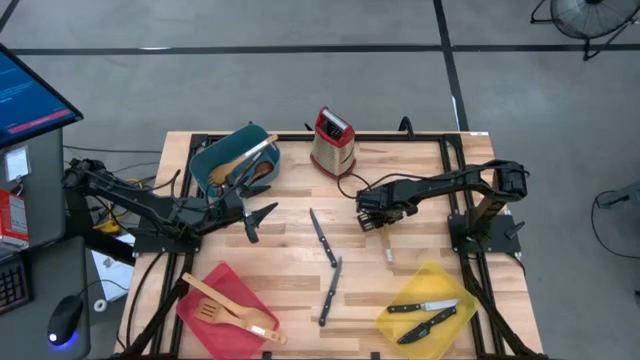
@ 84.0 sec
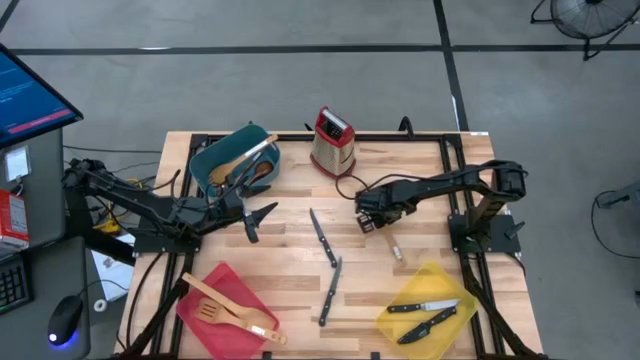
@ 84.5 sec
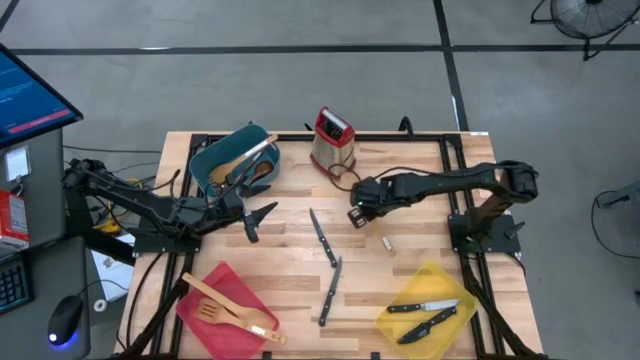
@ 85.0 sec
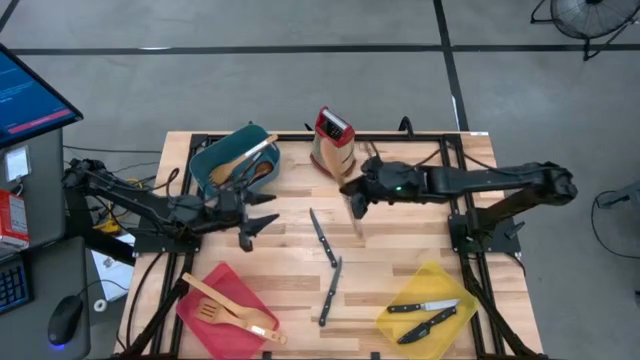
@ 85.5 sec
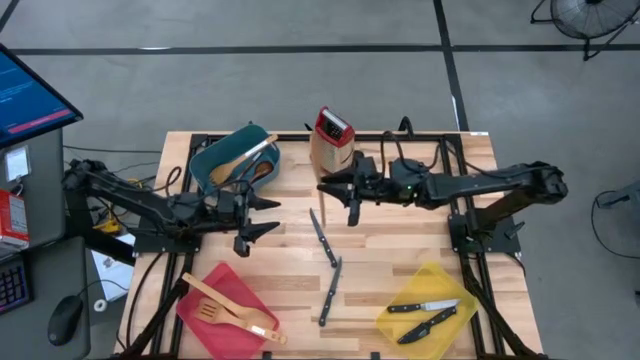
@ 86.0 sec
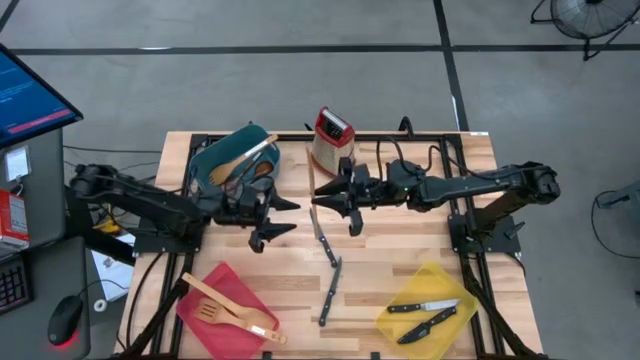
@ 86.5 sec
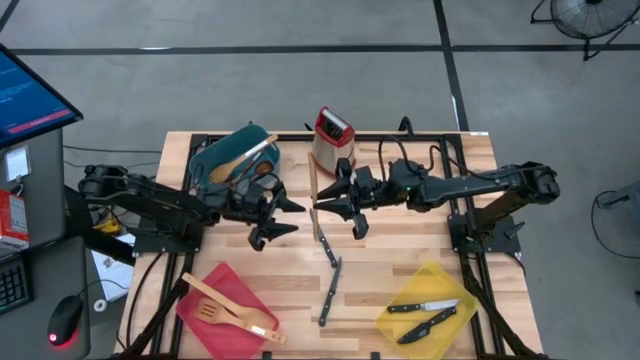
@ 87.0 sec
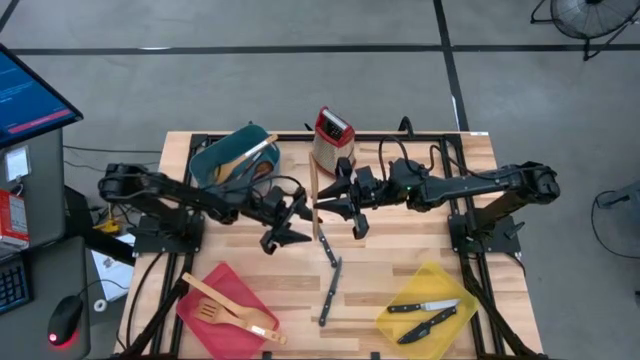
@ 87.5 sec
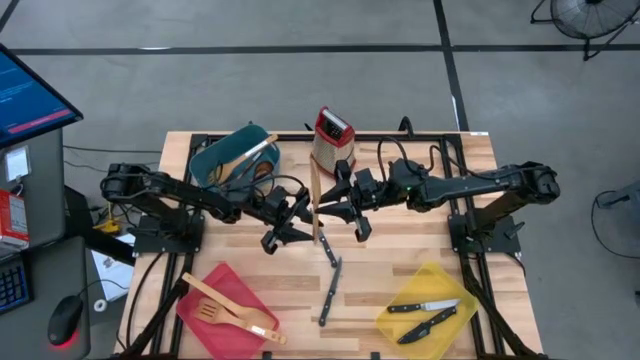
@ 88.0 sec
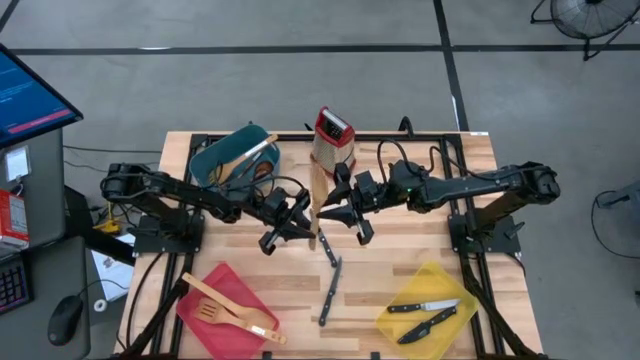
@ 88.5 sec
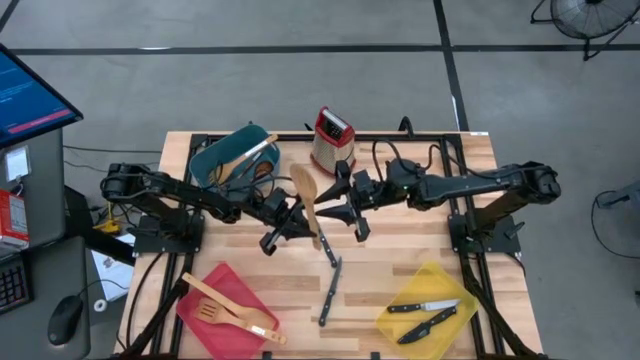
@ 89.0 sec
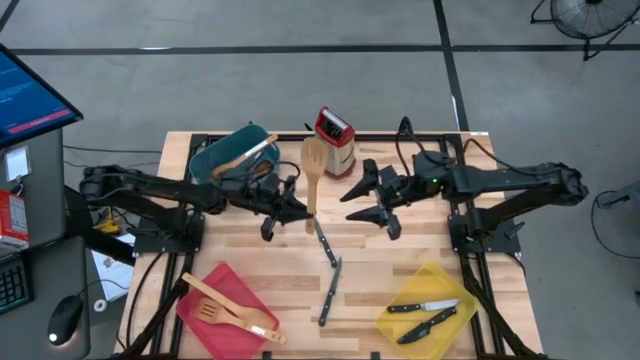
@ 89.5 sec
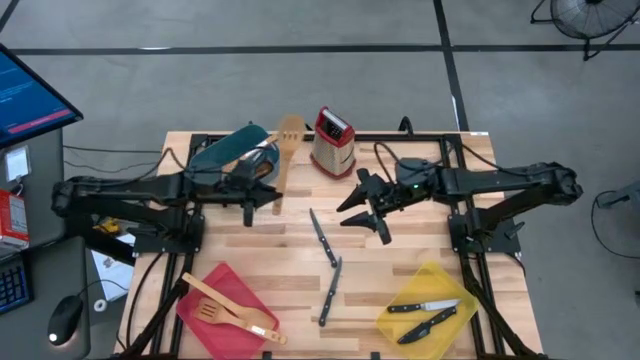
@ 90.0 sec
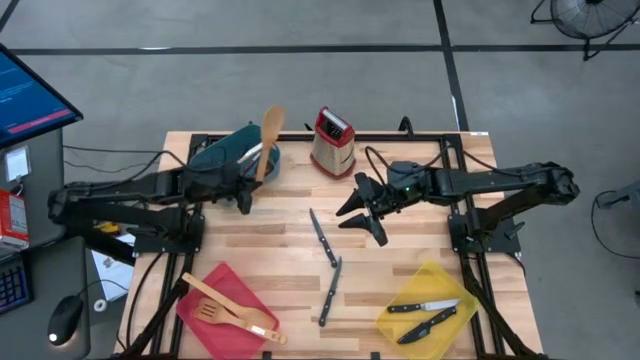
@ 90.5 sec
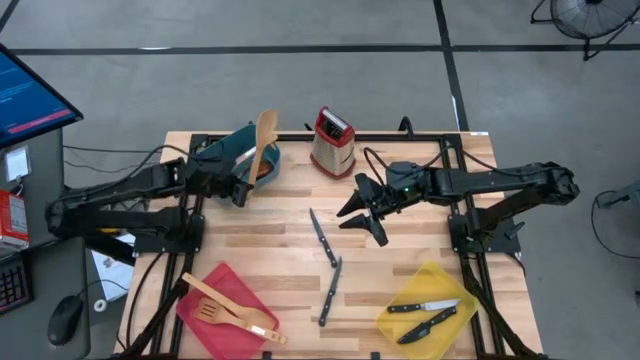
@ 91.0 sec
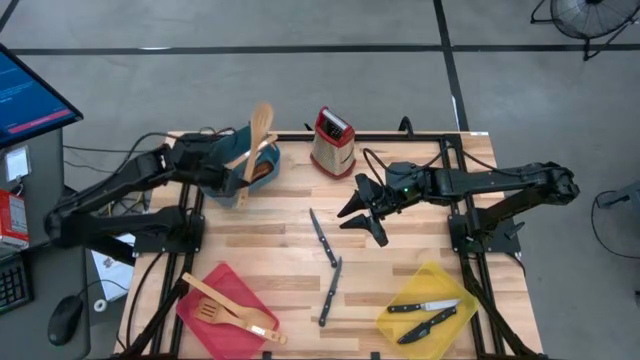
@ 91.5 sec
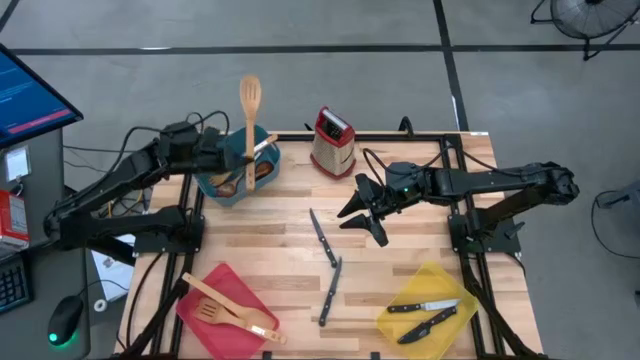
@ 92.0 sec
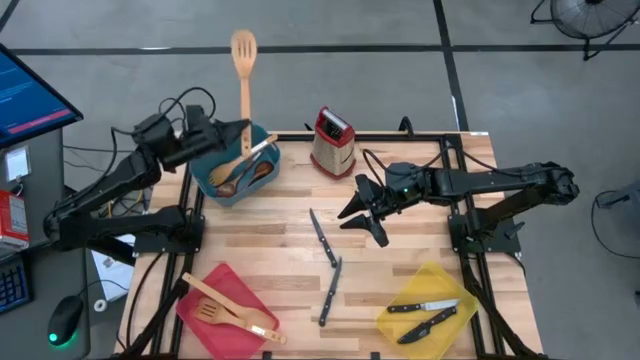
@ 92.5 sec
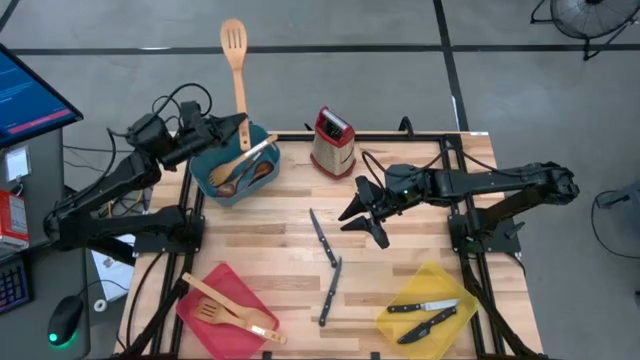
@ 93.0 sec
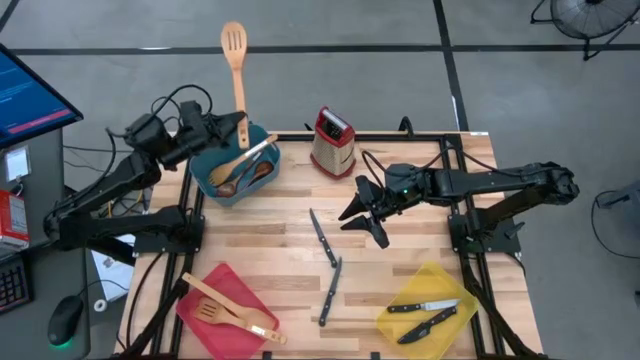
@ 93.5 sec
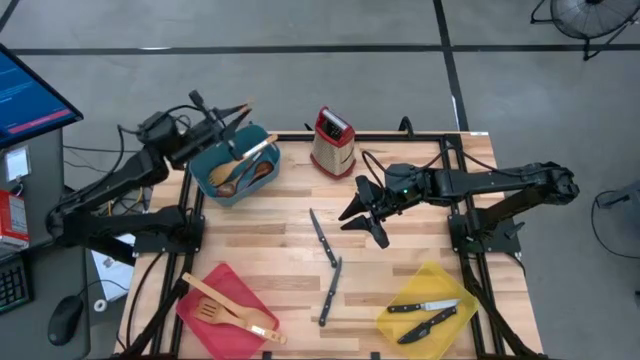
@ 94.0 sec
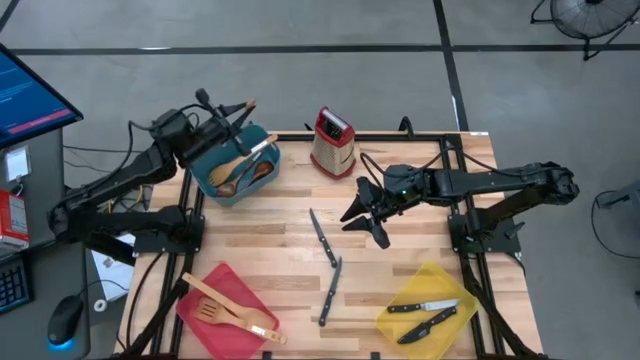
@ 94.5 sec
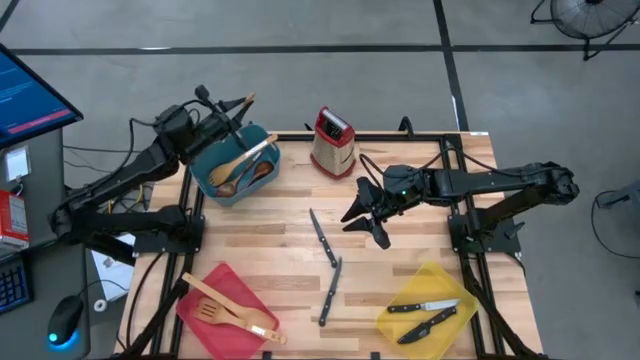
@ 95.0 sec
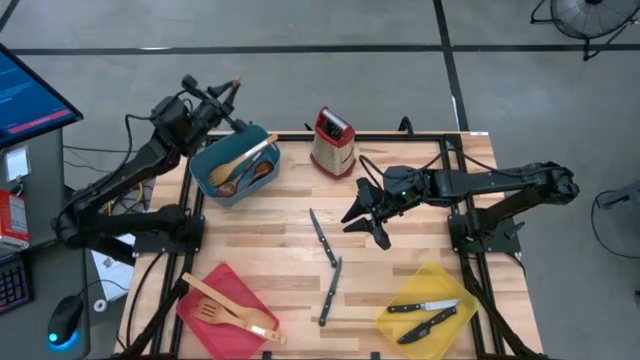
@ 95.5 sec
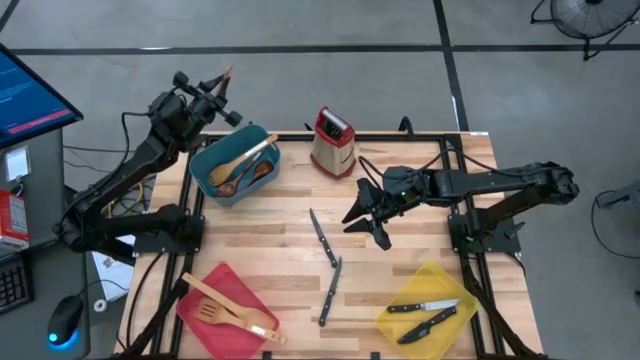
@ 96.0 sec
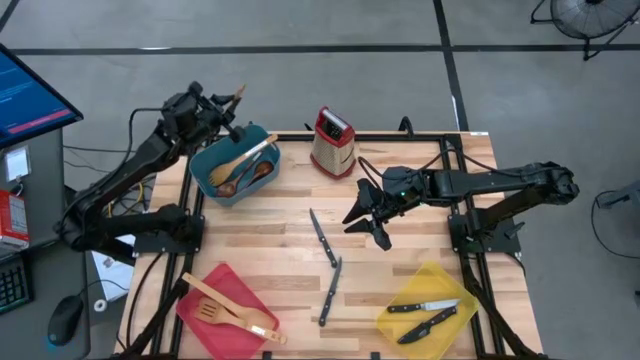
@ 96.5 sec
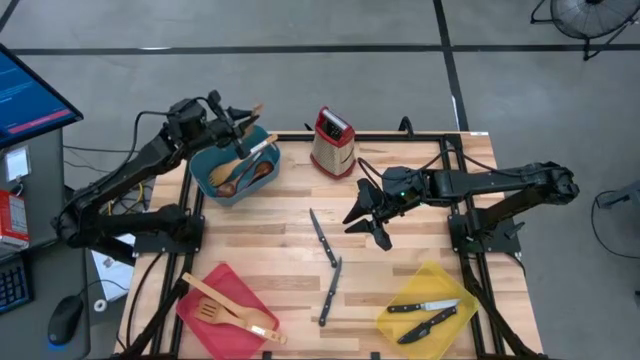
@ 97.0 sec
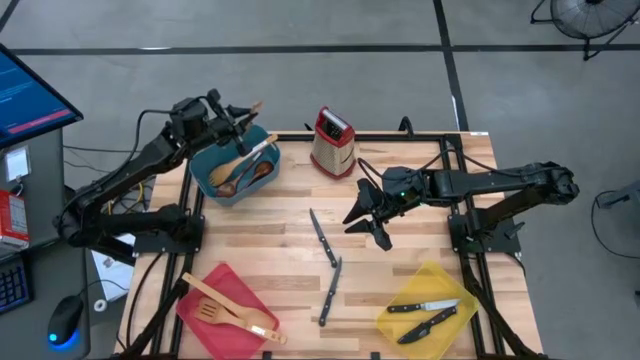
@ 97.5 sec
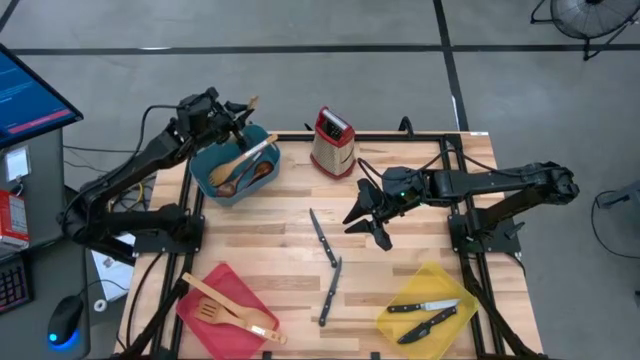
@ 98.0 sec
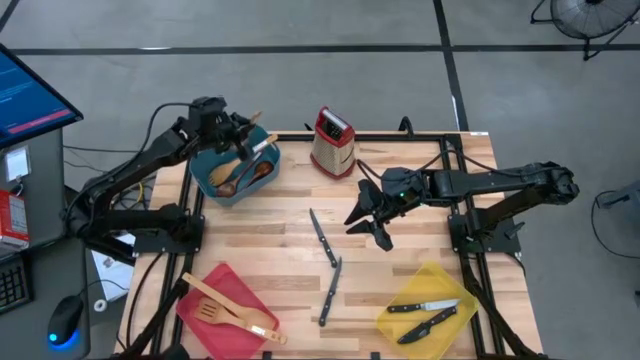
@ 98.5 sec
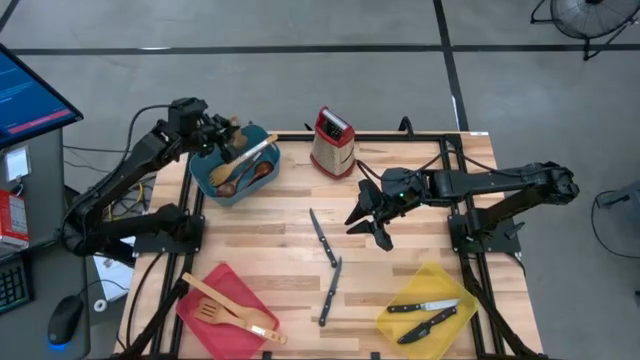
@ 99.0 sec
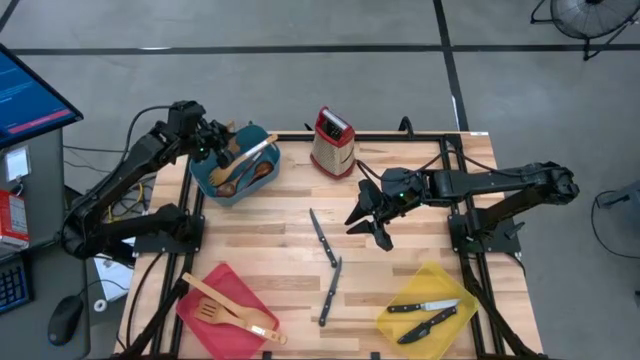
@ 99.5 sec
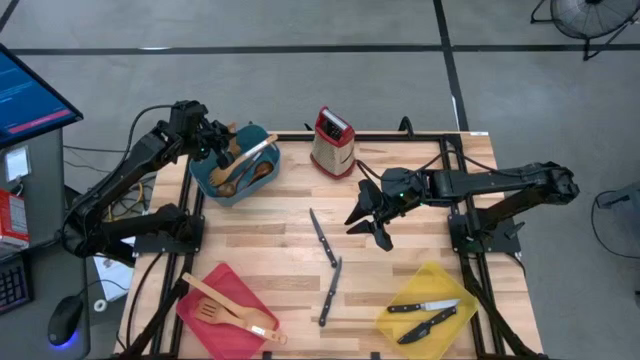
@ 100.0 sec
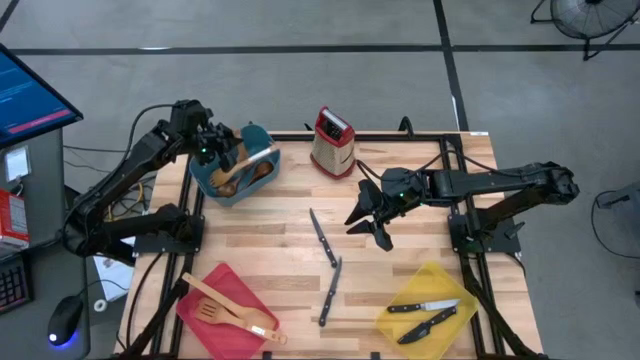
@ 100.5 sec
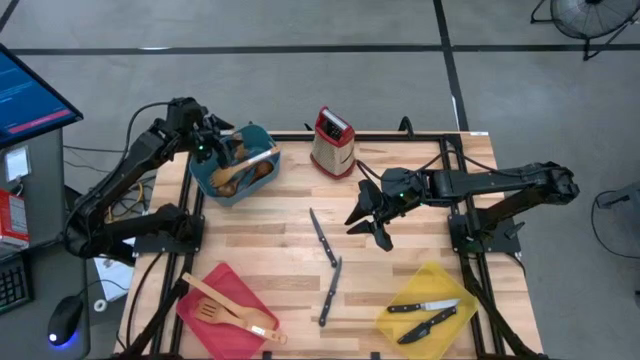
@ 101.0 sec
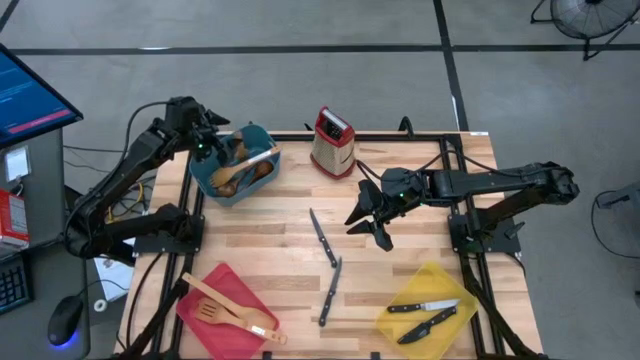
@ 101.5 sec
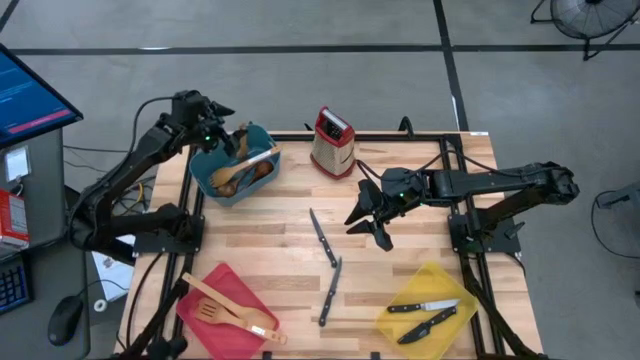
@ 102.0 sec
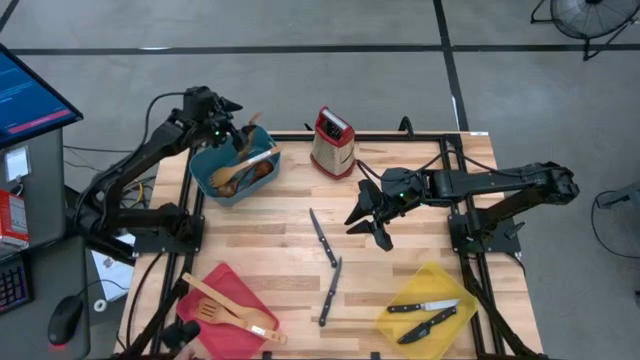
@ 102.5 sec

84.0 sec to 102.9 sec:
Task: Pick & Place Kitchen Items
Put the brown wooden serving spoon into the blue bin

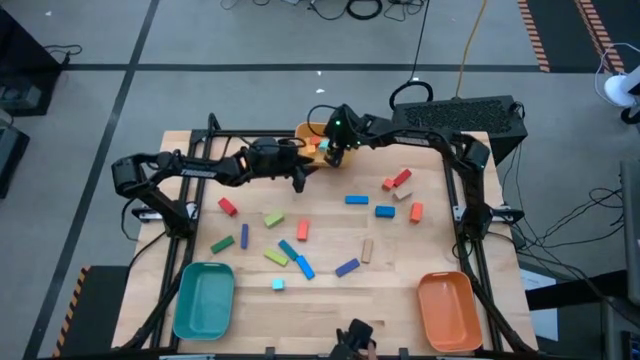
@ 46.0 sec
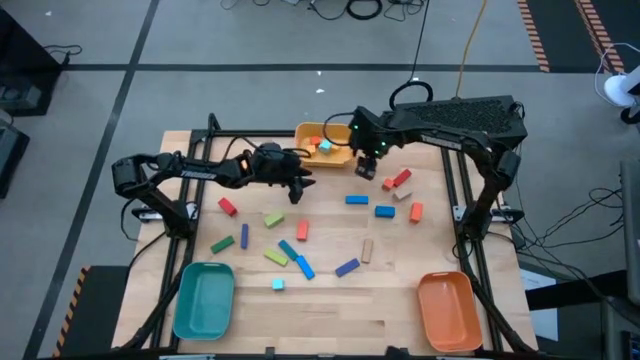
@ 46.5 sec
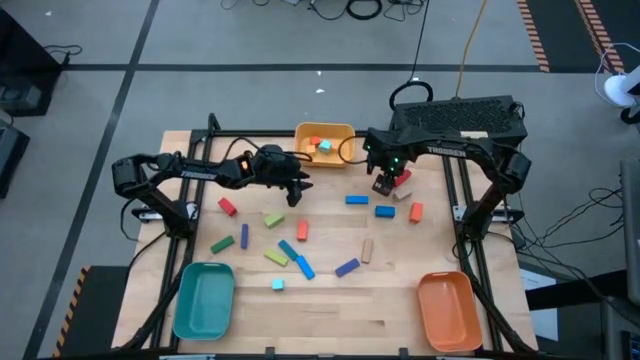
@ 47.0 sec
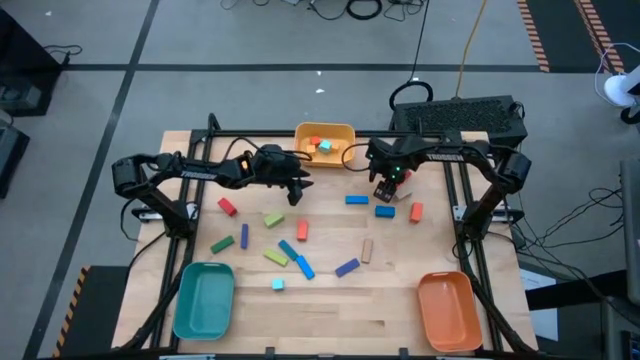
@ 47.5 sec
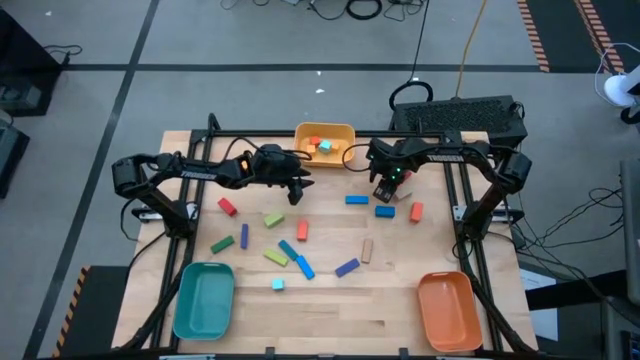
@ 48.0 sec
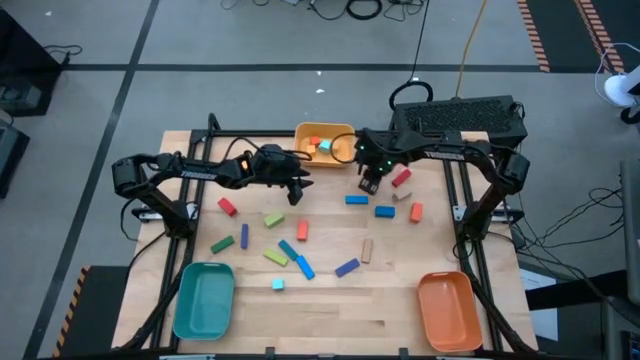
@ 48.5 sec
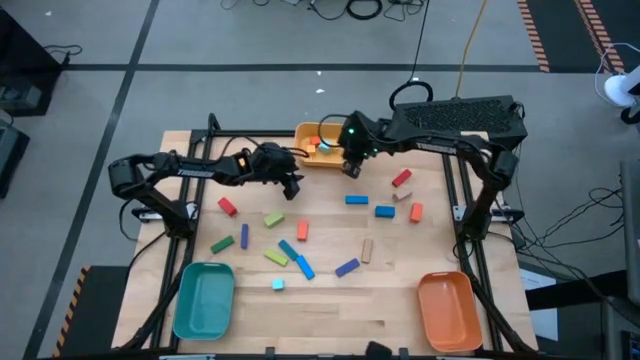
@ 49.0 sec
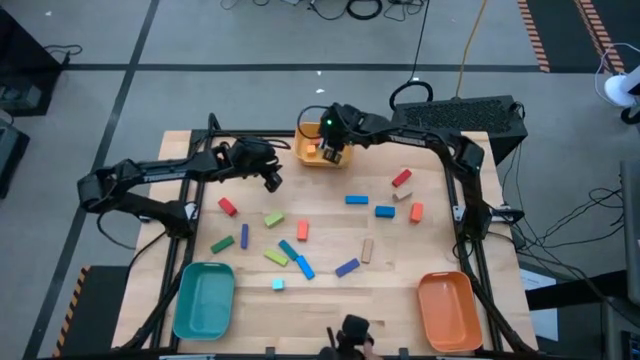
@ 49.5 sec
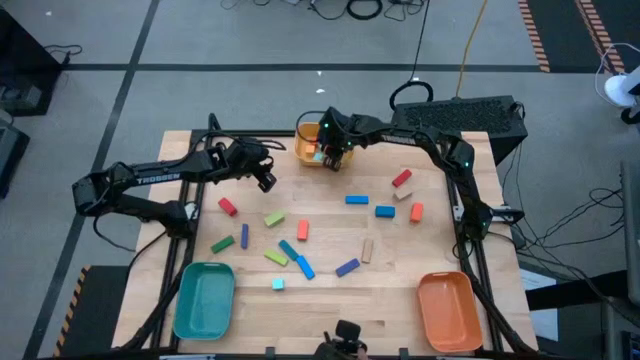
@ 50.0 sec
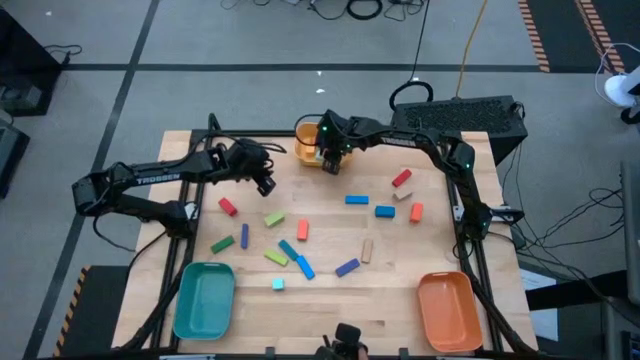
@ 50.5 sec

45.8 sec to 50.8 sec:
Task: Sort blocks by size
Put the orange square block into the yellow bin
